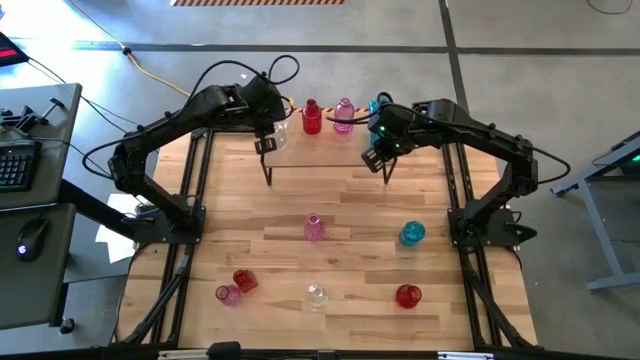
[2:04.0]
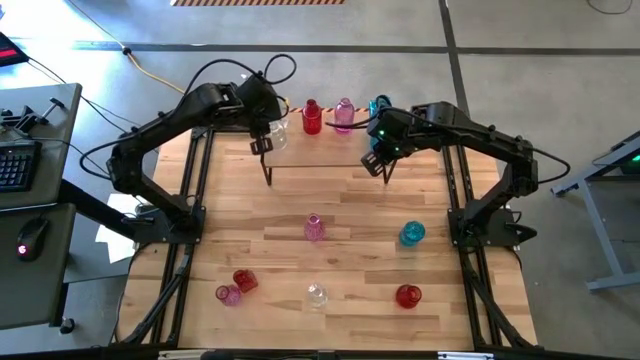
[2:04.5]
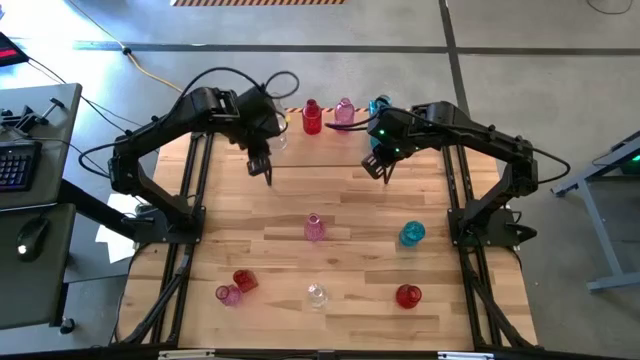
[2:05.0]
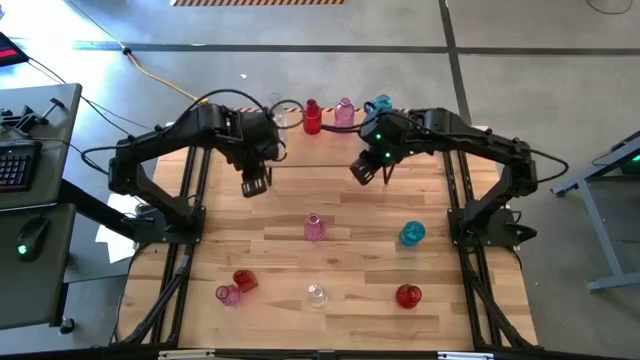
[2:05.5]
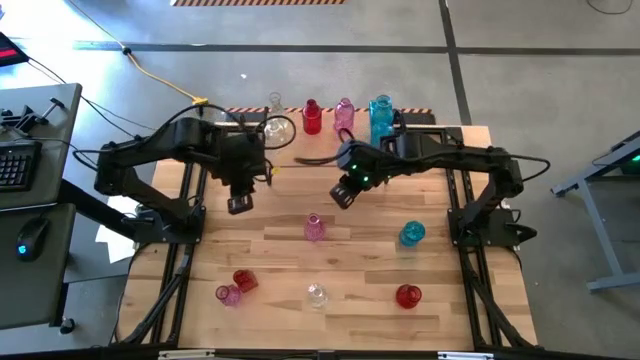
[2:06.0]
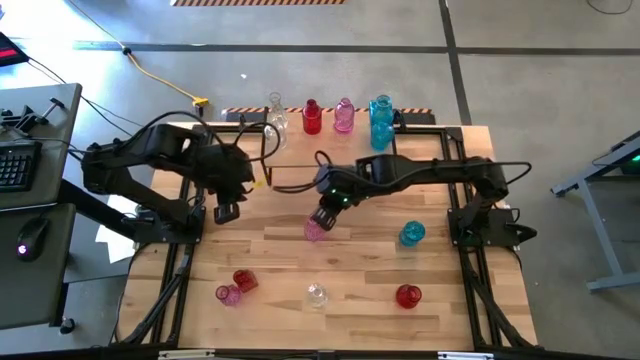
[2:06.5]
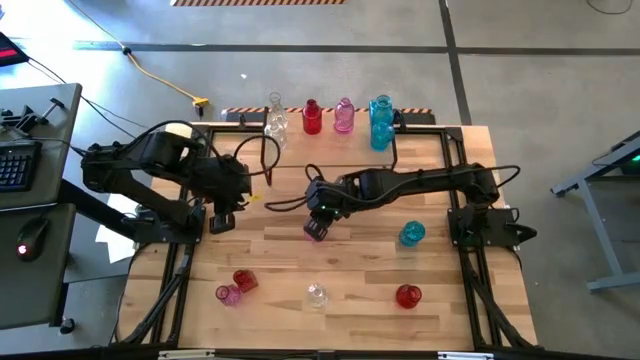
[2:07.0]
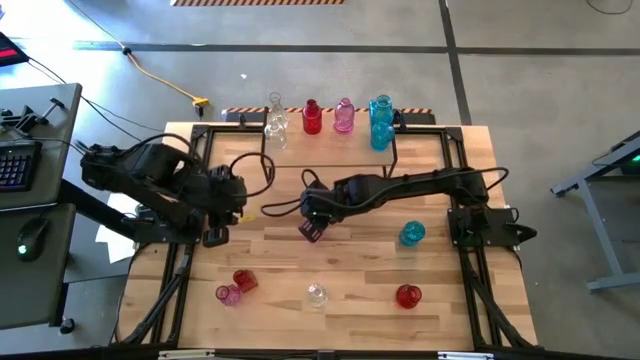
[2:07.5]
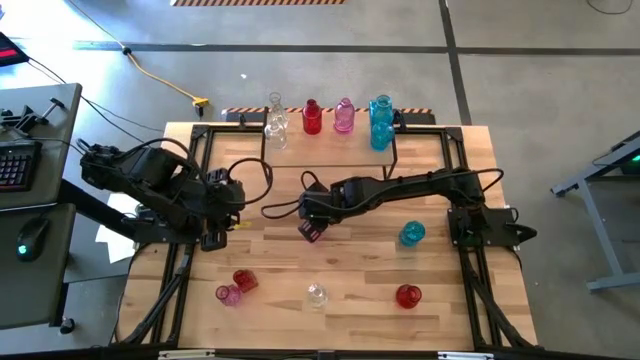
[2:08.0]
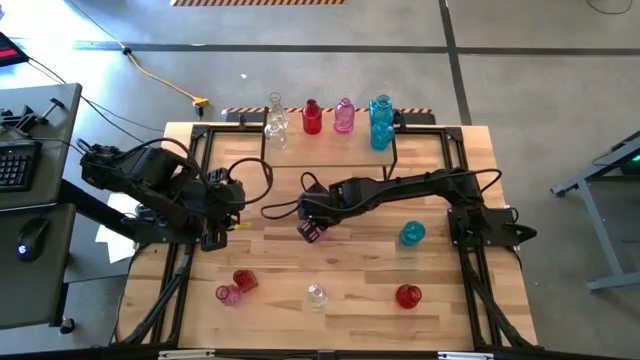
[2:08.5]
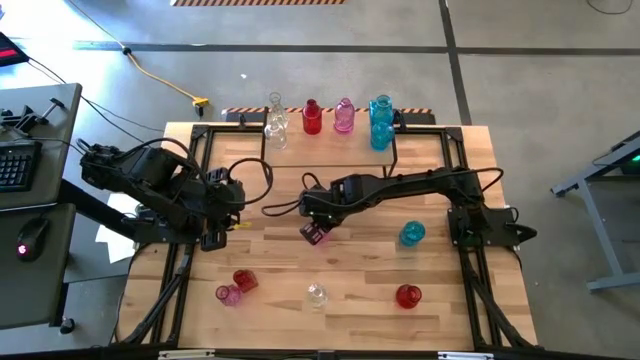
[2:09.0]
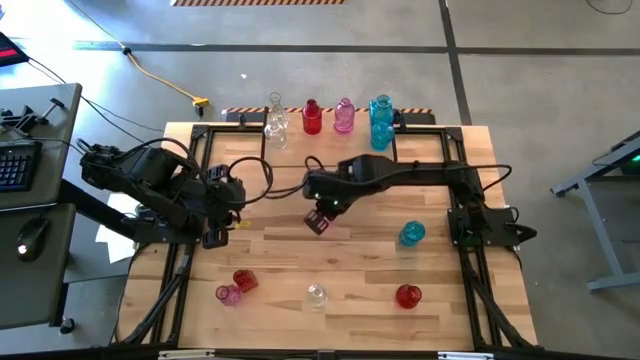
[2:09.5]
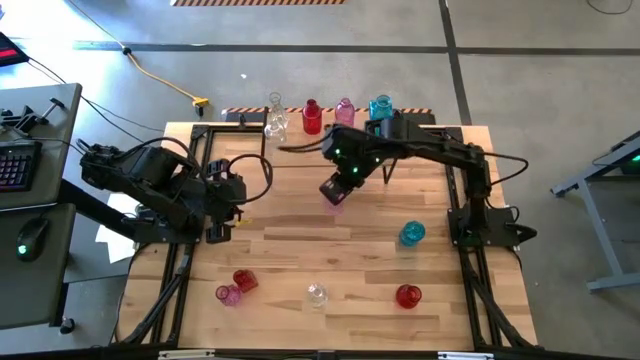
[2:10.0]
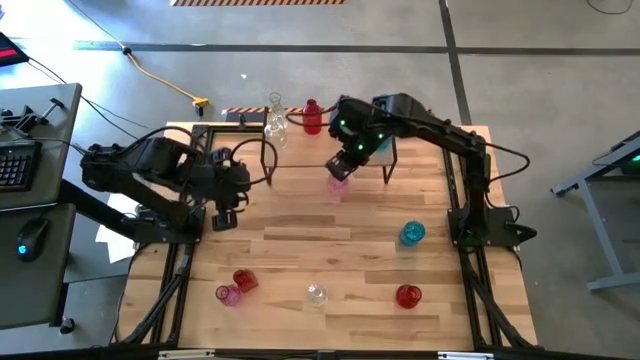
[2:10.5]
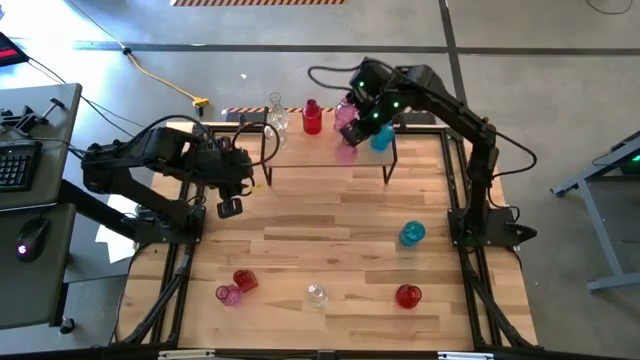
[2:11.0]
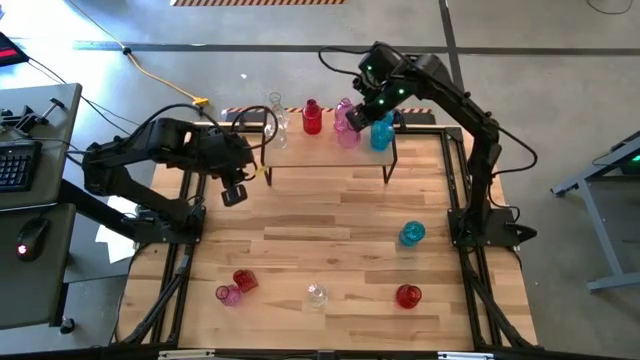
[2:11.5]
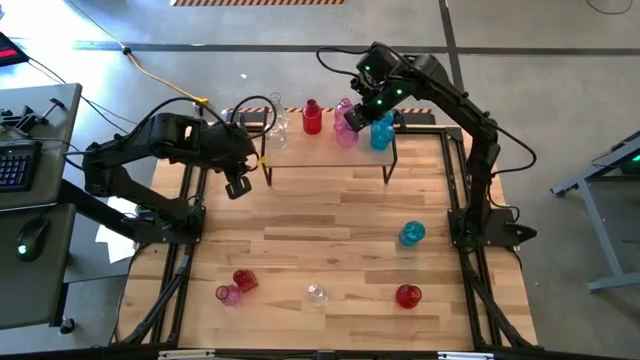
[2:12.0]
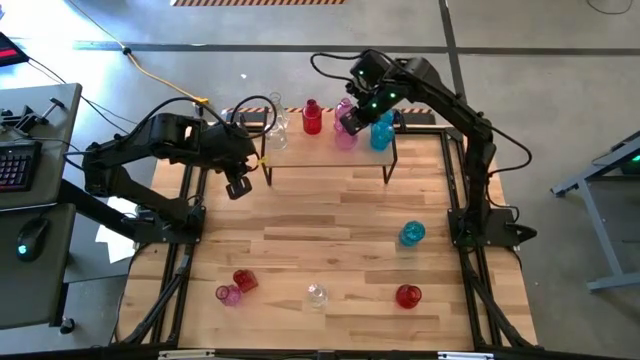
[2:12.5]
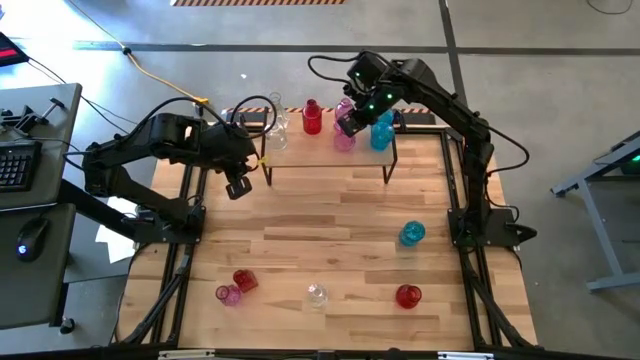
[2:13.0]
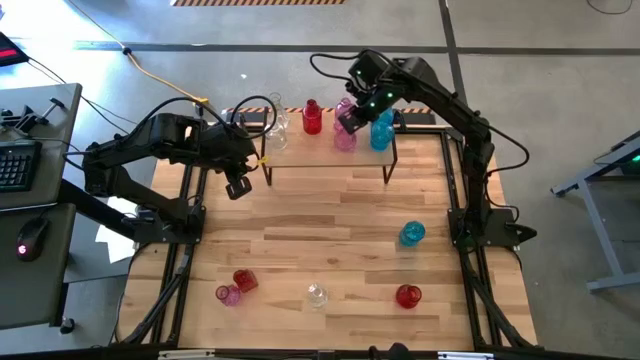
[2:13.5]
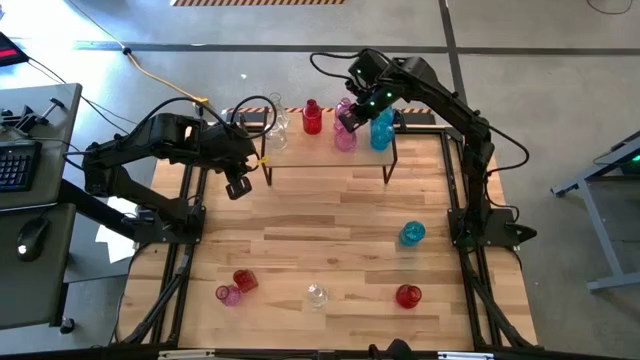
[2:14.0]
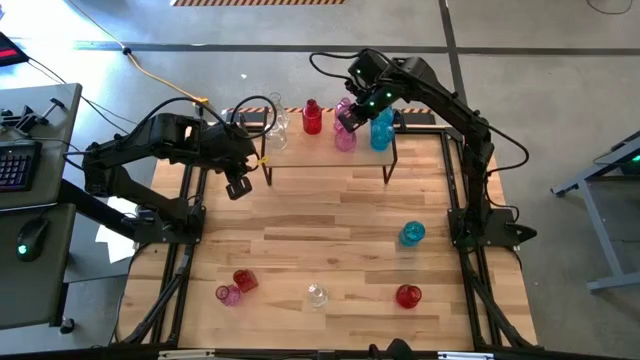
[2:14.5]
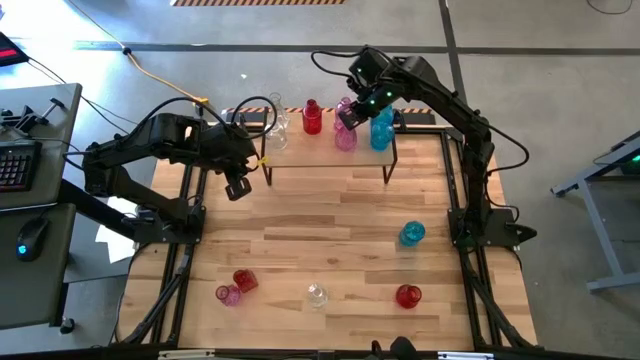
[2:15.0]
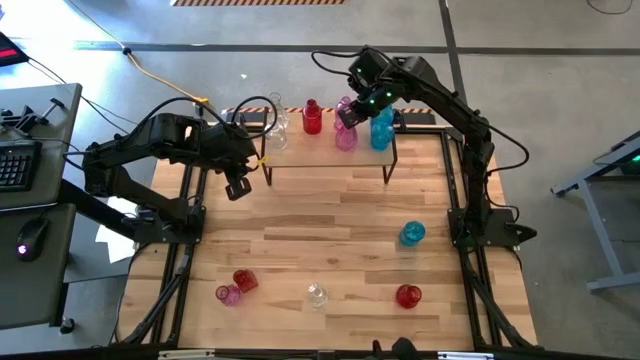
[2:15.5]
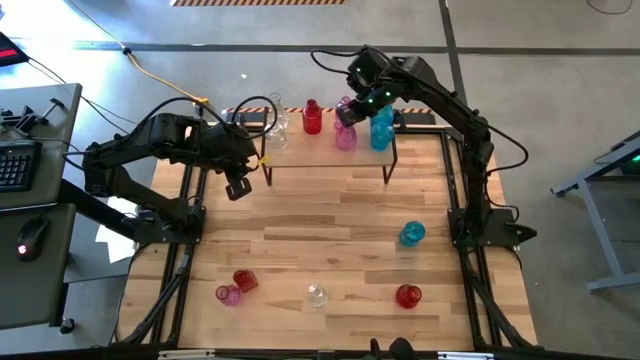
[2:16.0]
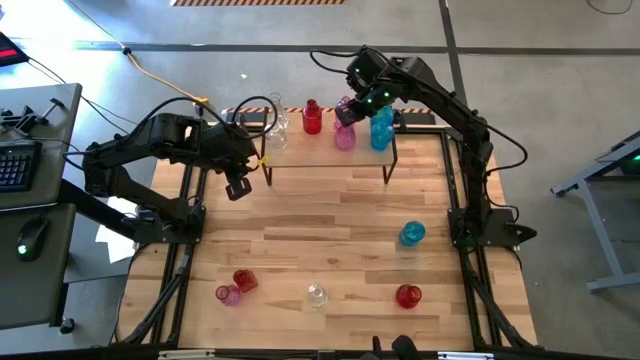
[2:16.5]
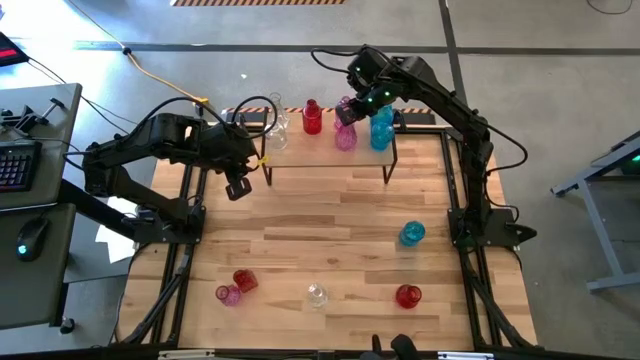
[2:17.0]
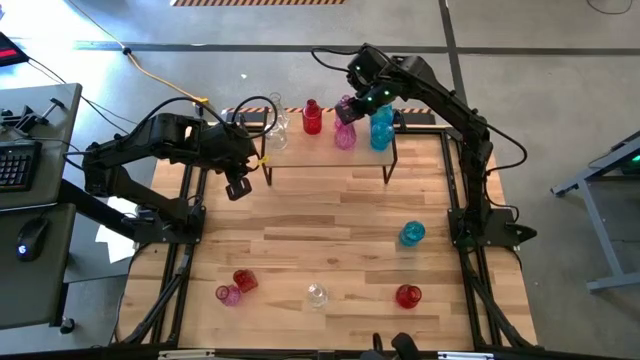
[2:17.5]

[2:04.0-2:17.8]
Task: sort vases onto shelf
Put the right pink vase on the shelf aligned with the other pink vase
